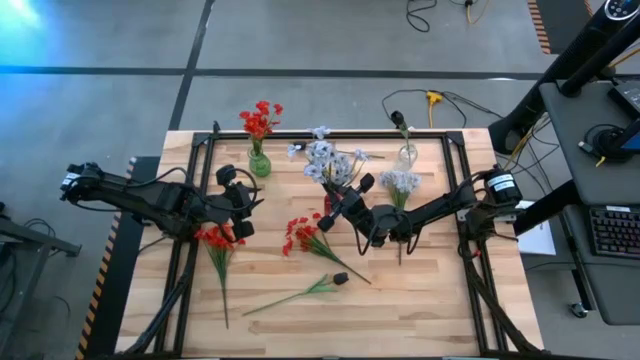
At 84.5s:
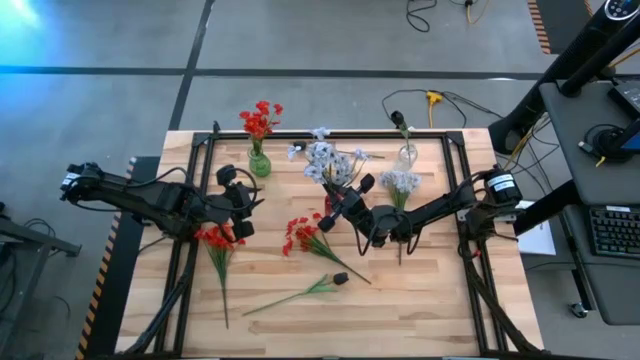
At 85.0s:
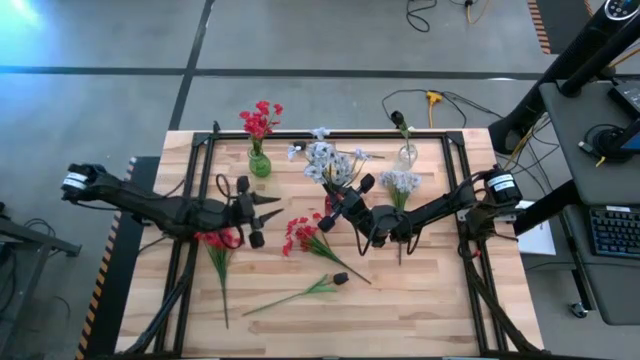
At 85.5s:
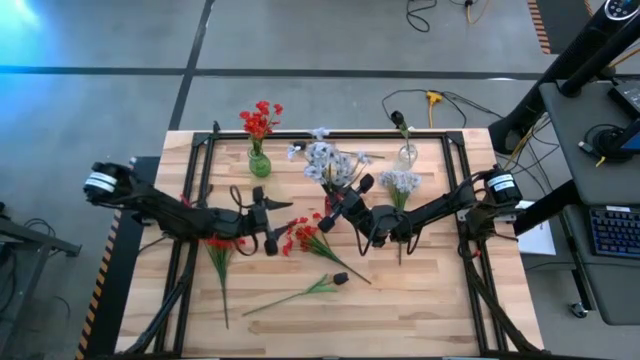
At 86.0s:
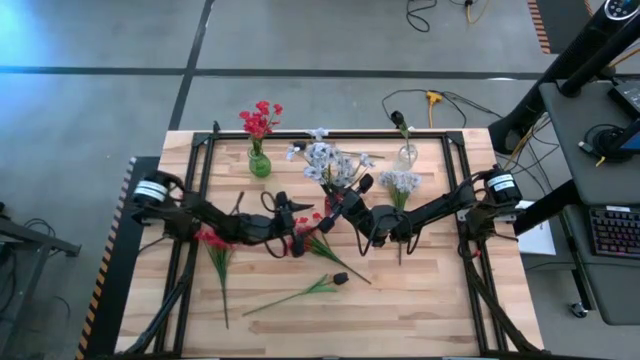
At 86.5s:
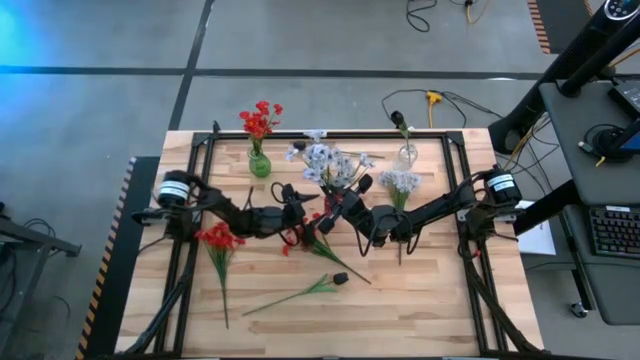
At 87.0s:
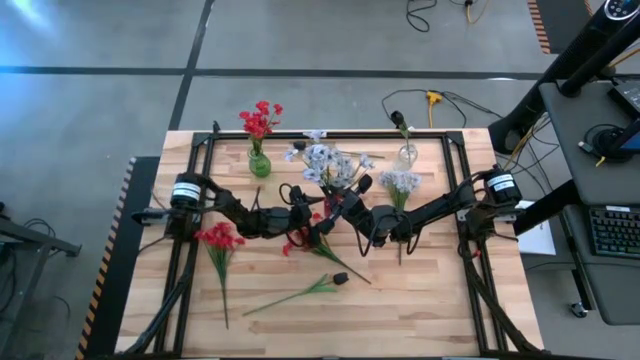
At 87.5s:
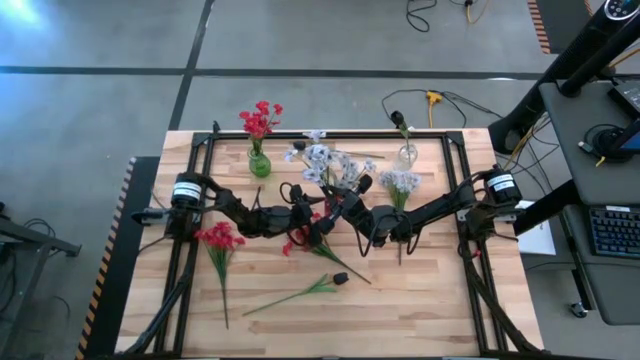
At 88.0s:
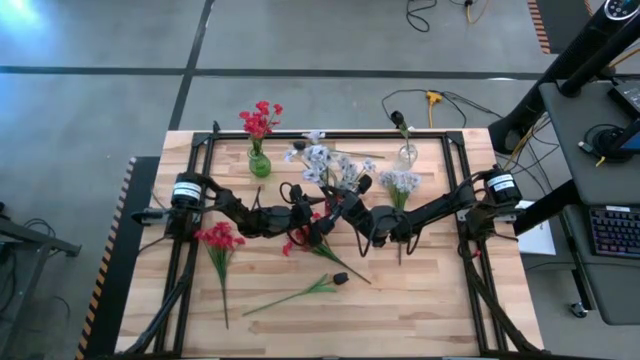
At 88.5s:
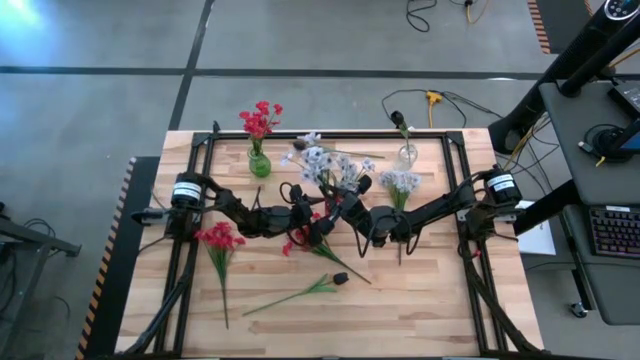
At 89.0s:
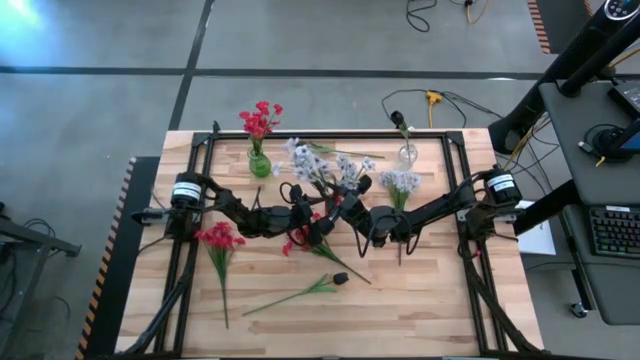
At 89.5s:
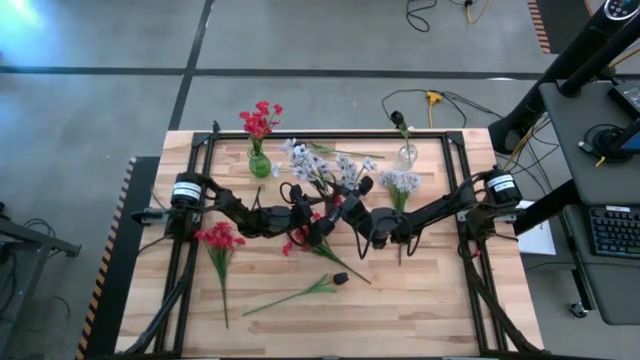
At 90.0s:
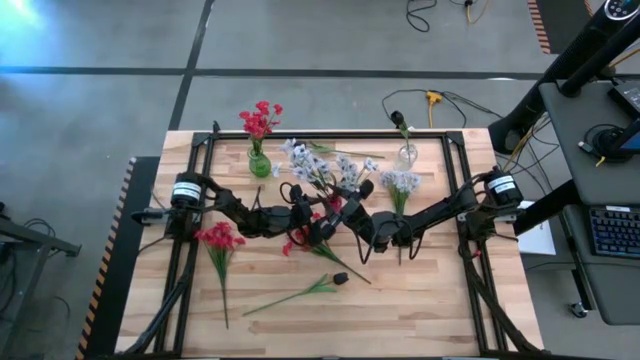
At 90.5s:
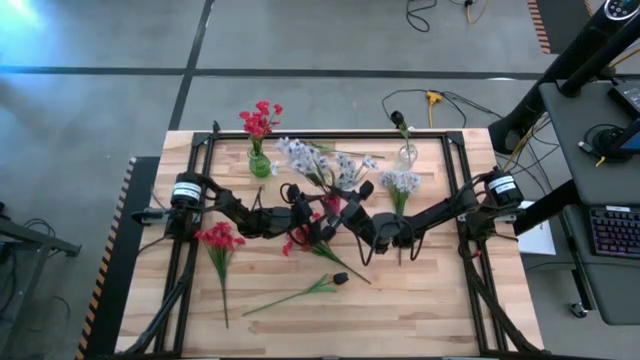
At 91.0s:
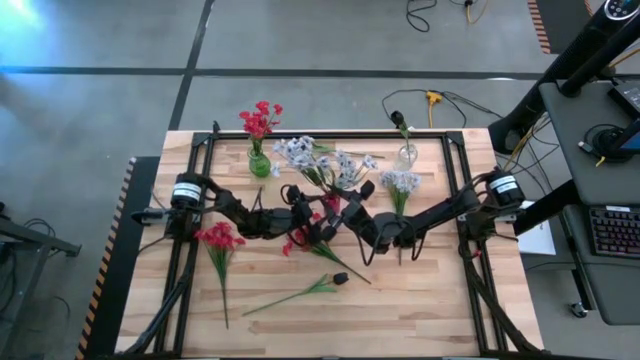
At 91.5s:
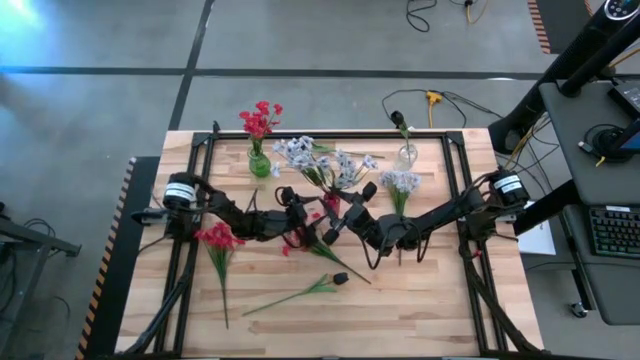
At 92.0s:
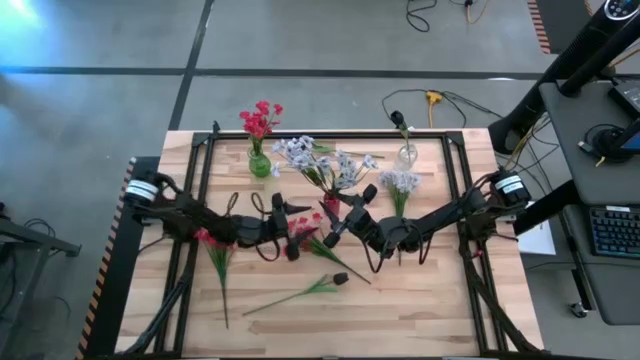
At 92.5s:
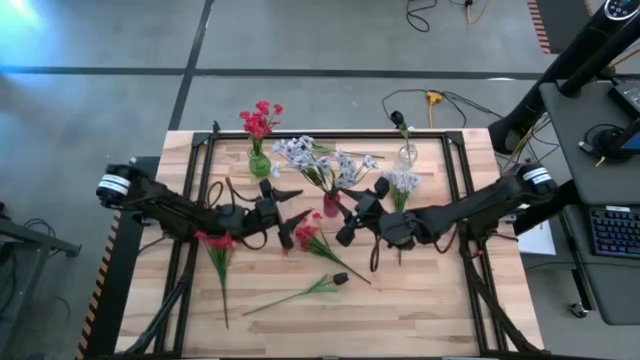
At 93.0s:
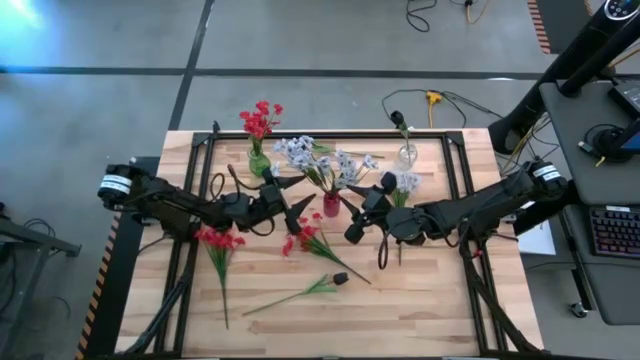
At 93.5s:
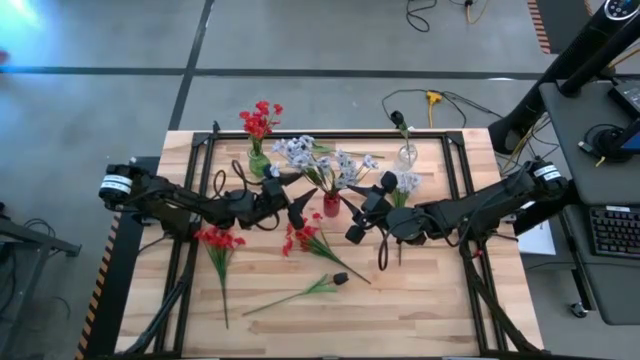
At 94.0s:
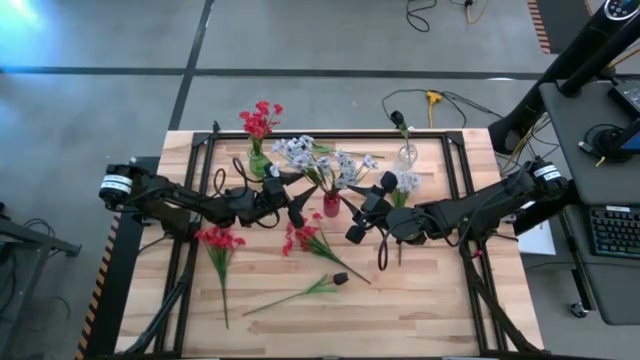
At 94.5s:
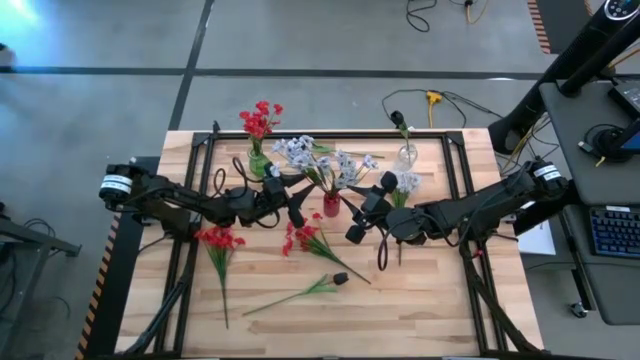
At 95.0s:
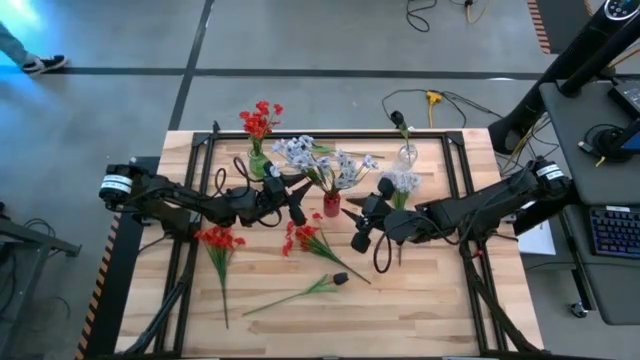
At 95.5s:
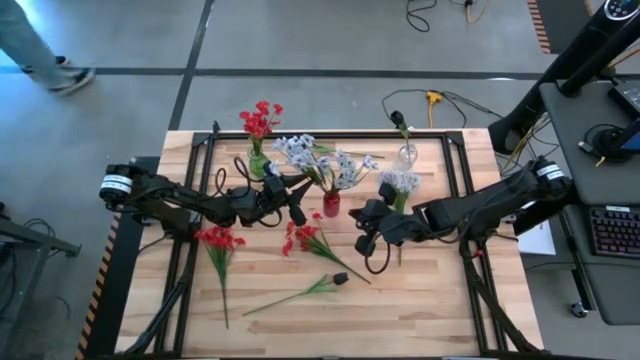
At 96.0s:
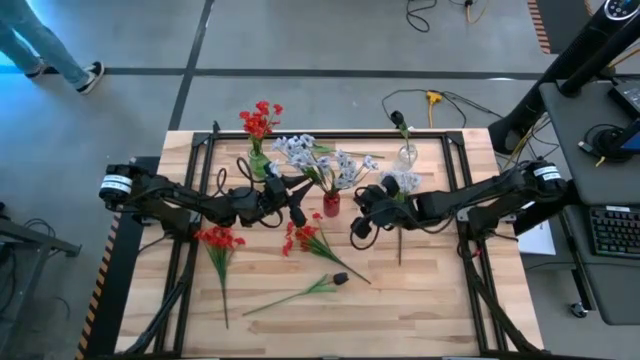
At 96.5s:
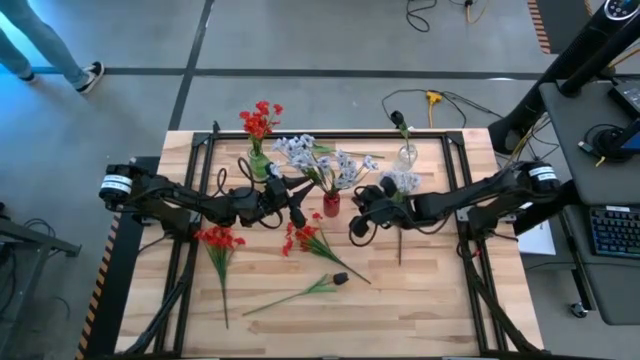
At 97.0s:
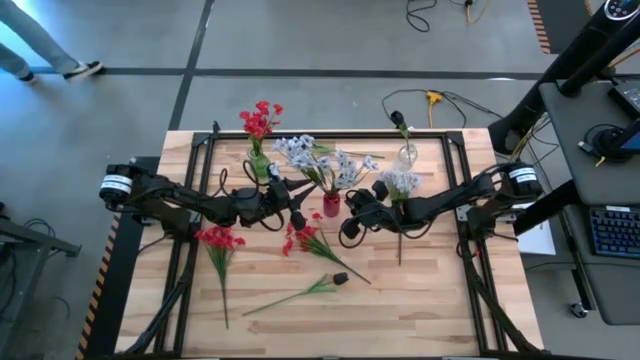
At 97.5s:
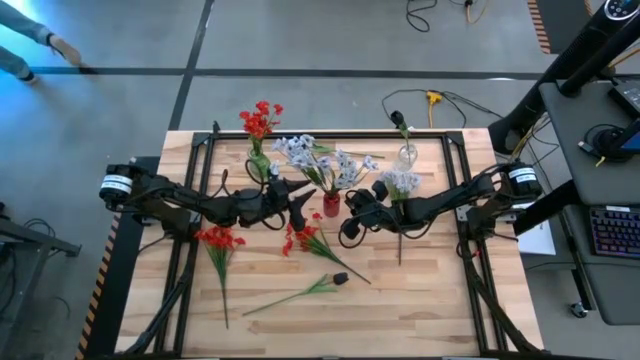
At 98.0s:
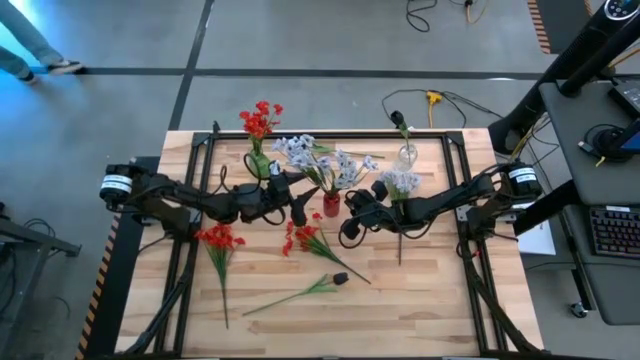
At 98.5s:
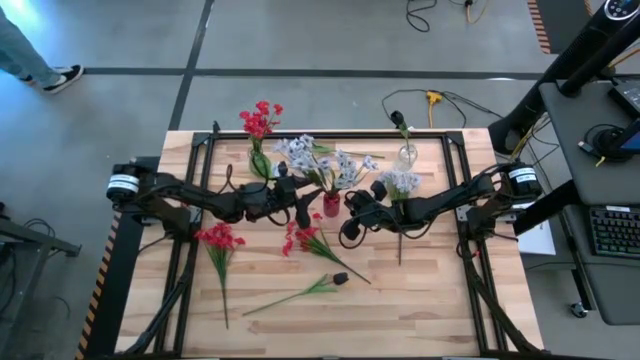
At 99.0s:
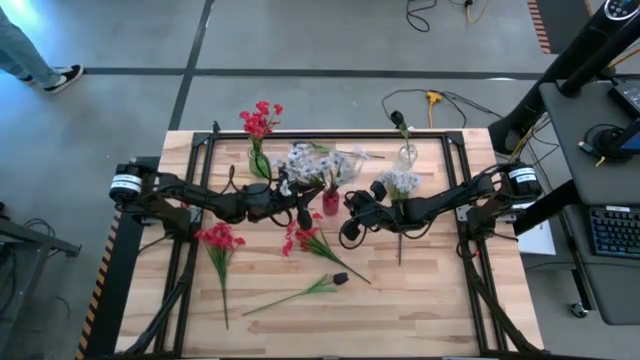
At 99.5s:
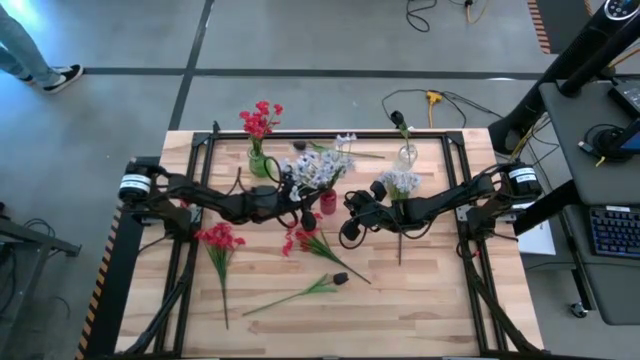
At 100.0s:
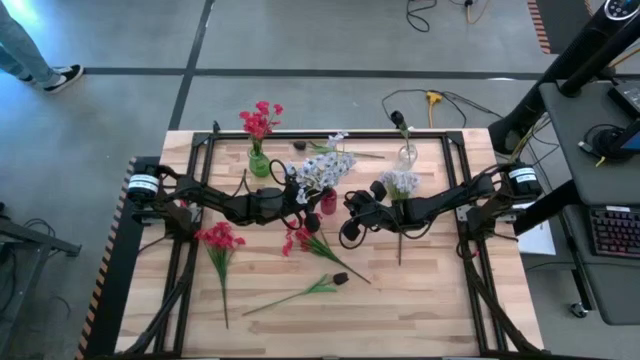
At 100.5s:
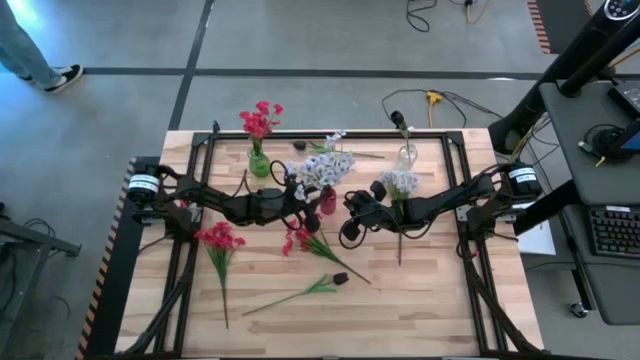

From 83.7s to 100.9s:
Task: Sort flowers into vase by color
Put the right white flowers into the red vase

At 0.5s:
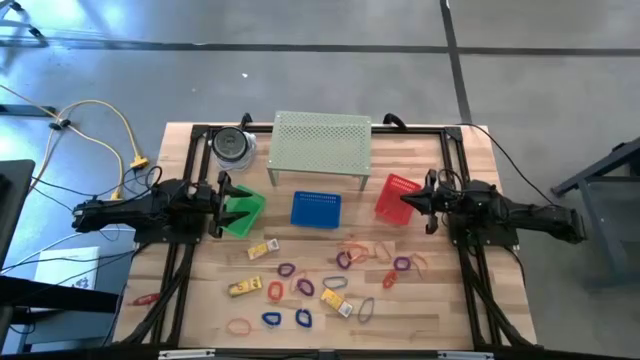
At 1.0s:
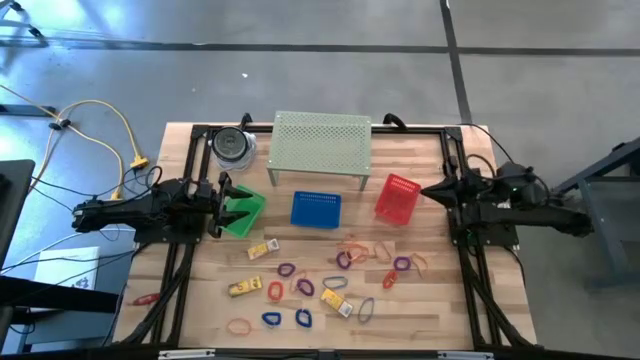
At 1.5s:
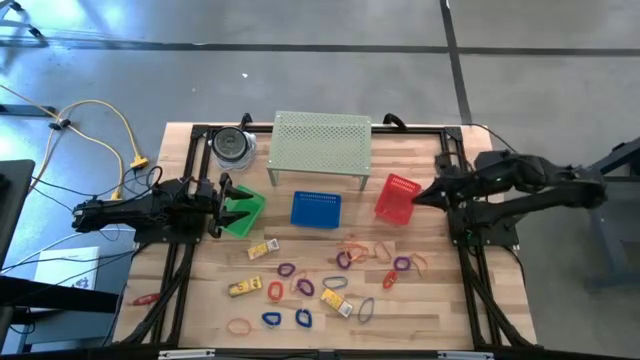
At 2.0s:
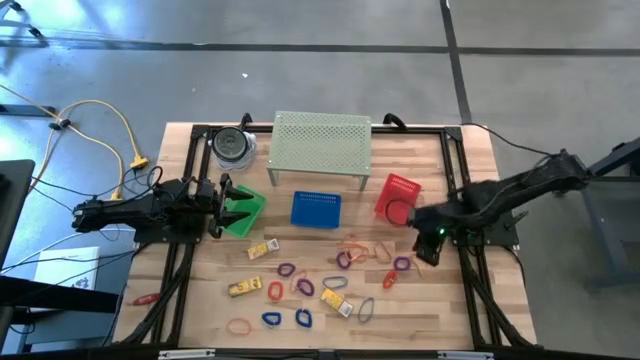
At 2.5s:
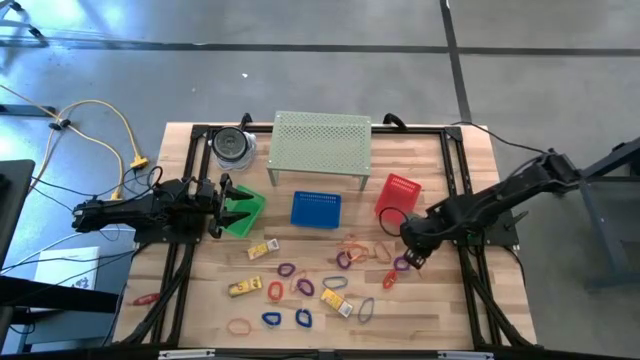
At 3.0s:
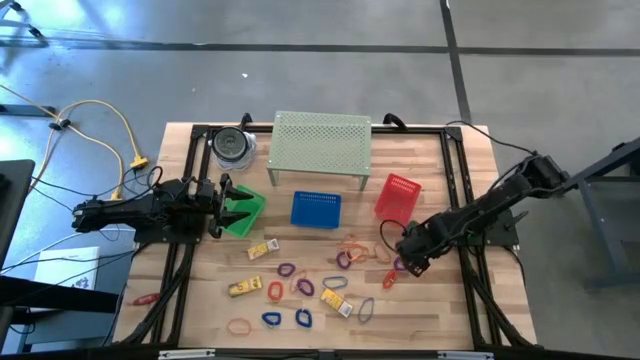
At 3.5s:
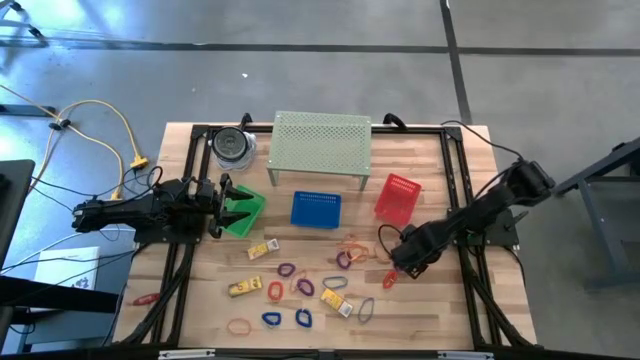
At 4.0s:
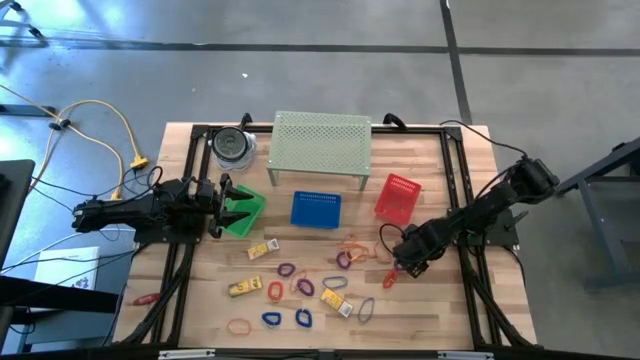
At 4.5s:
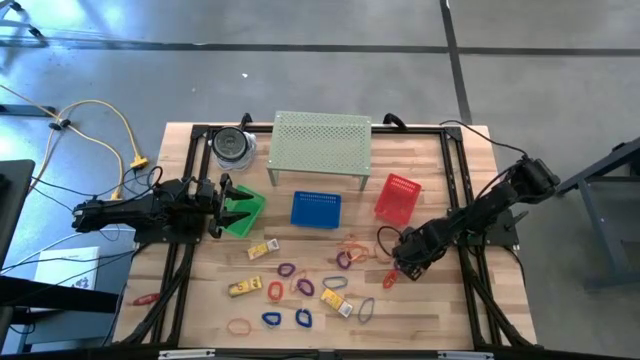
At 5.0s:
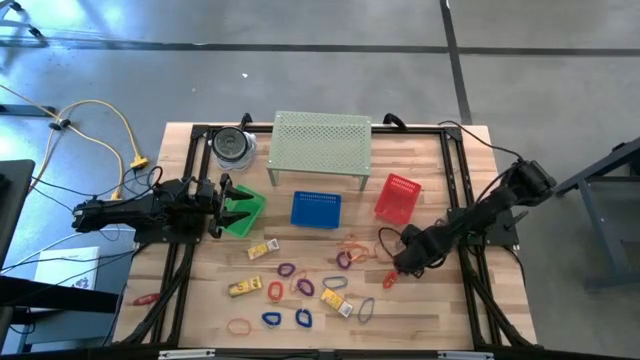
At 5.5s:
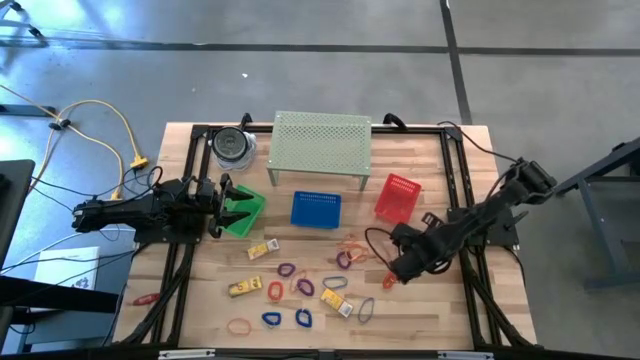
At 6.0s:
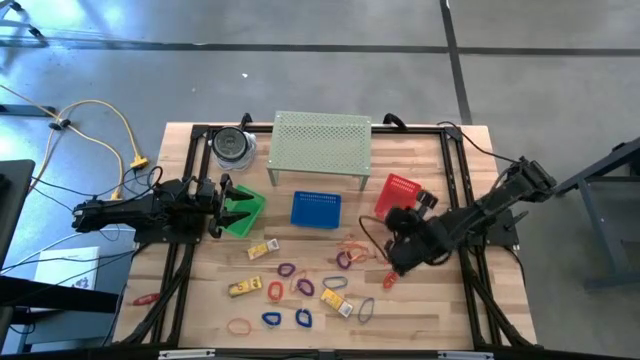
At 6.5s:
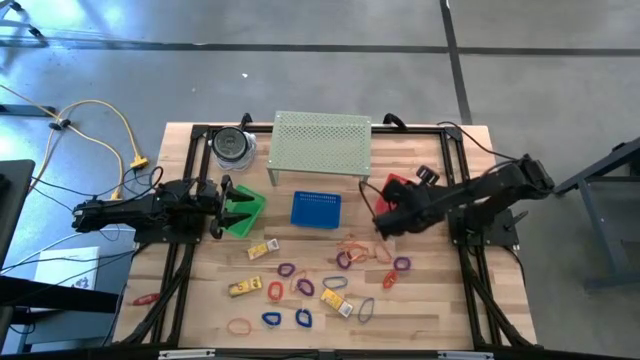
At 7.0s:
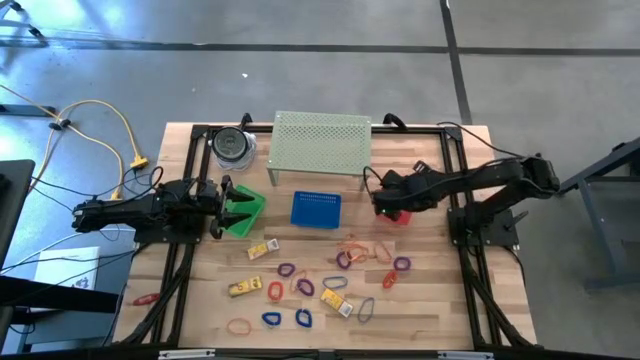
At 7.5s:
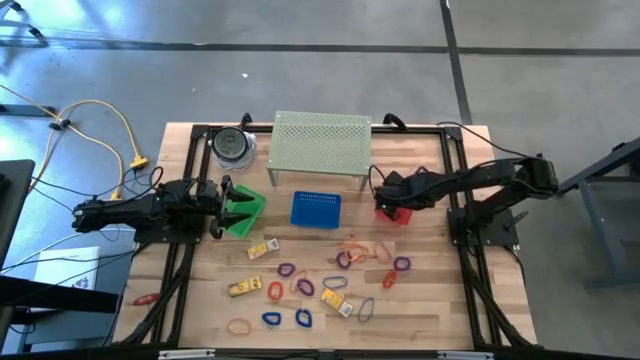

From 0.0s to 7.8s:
Task: Pick & Place Office Desk Supplies
Put the orange rubber band into the red bin
